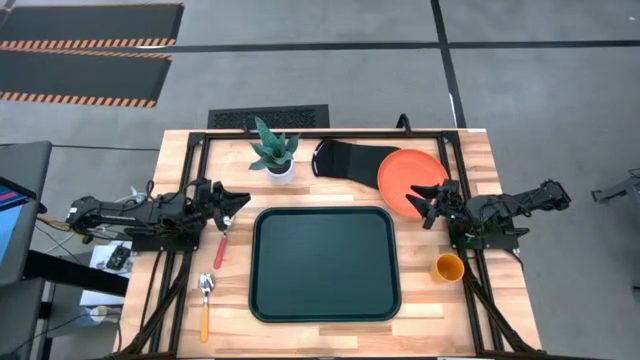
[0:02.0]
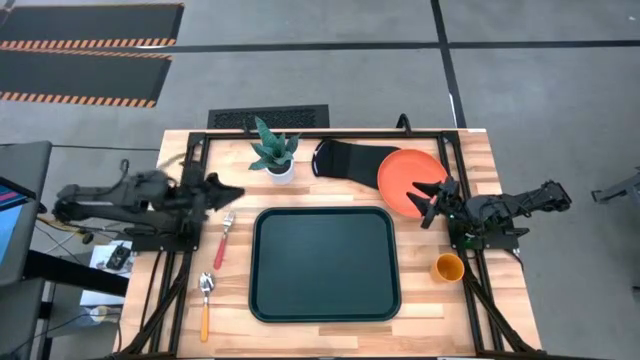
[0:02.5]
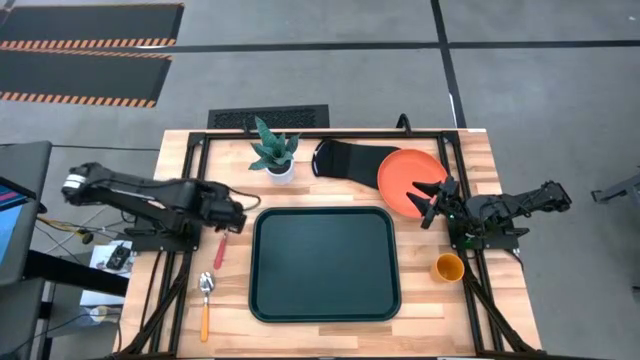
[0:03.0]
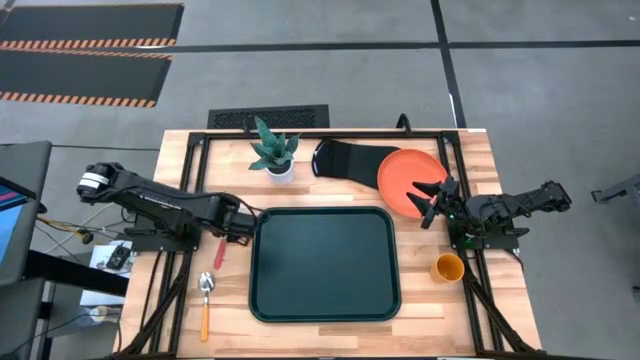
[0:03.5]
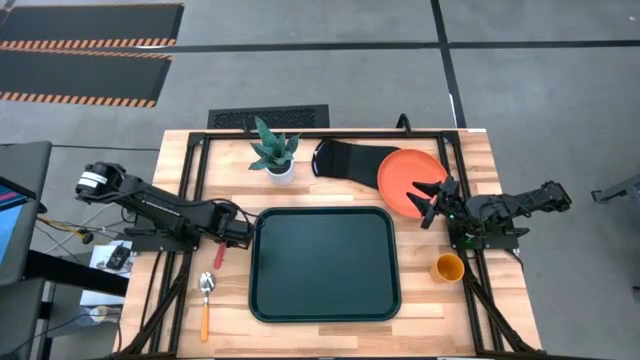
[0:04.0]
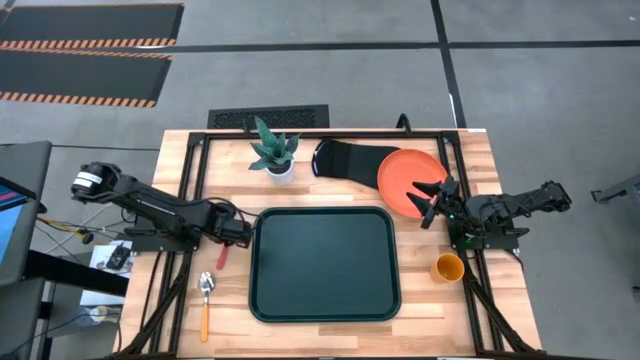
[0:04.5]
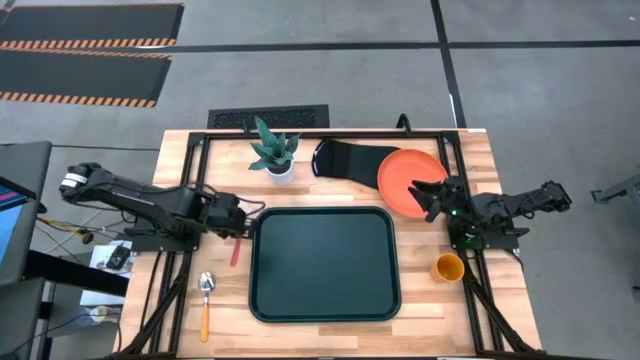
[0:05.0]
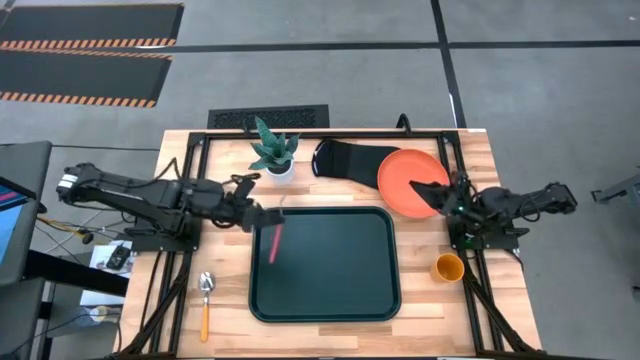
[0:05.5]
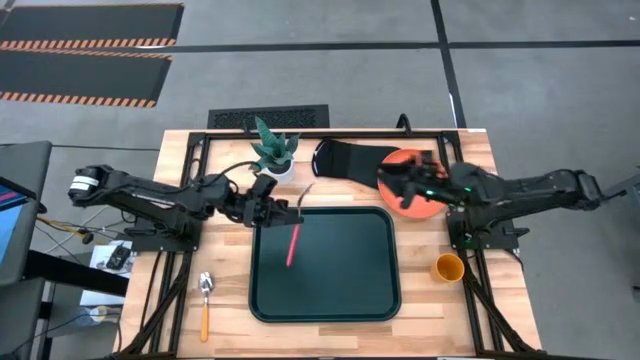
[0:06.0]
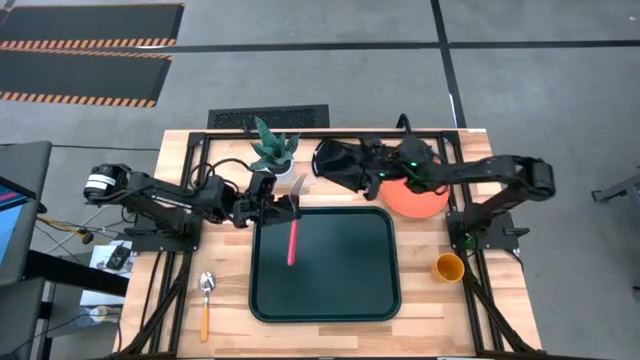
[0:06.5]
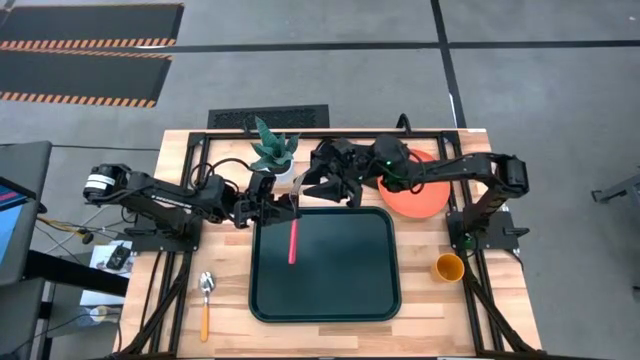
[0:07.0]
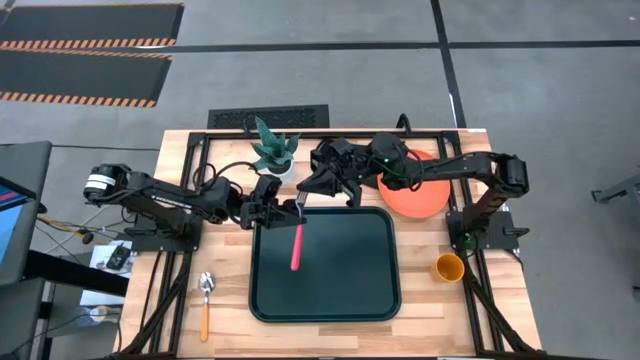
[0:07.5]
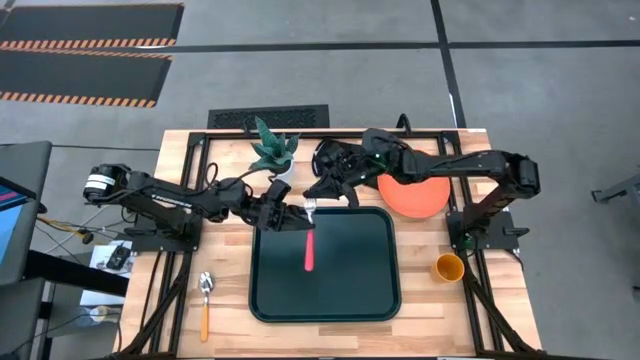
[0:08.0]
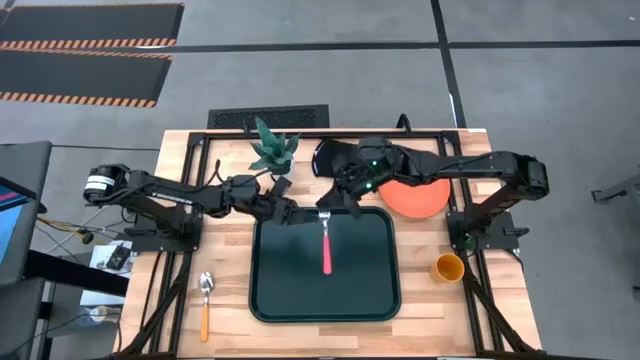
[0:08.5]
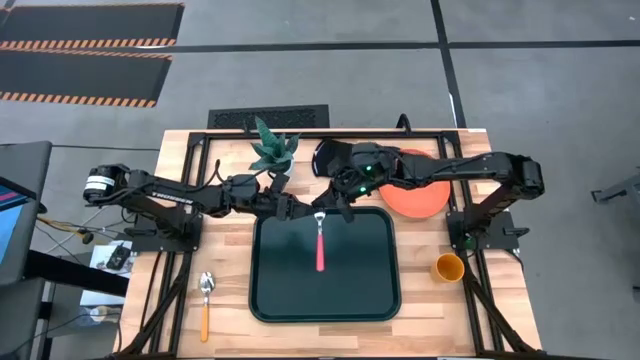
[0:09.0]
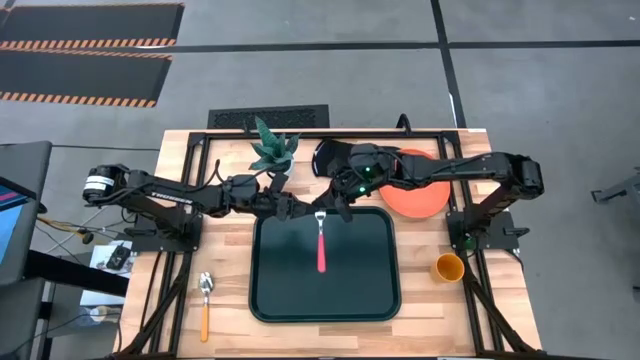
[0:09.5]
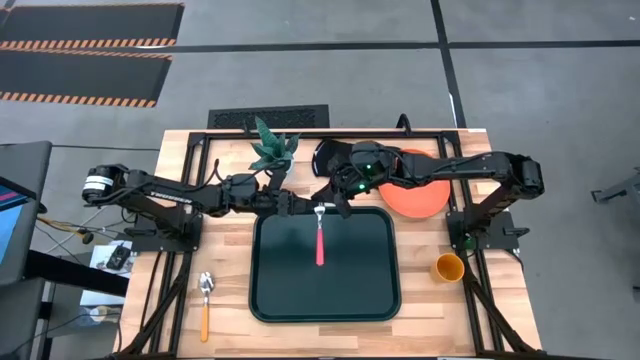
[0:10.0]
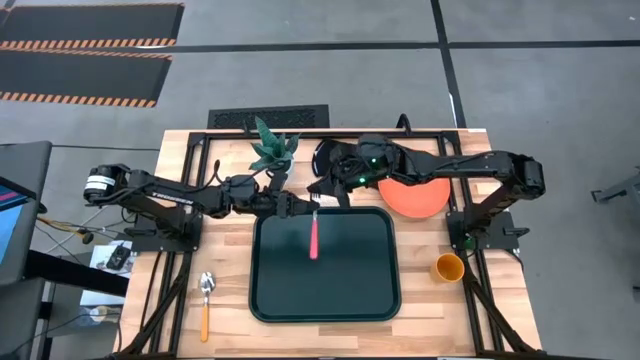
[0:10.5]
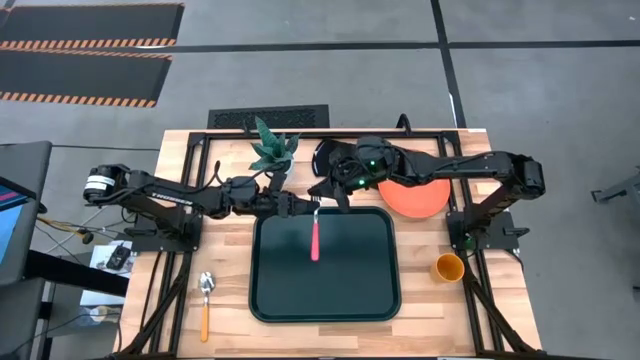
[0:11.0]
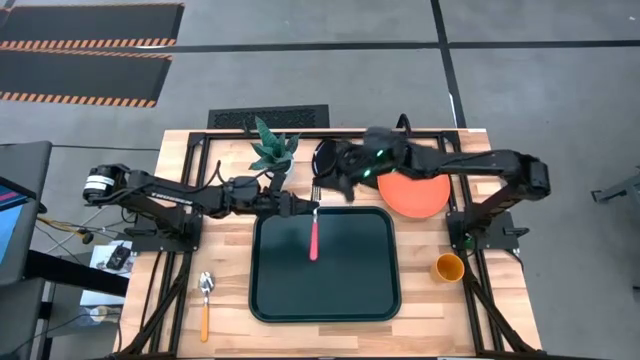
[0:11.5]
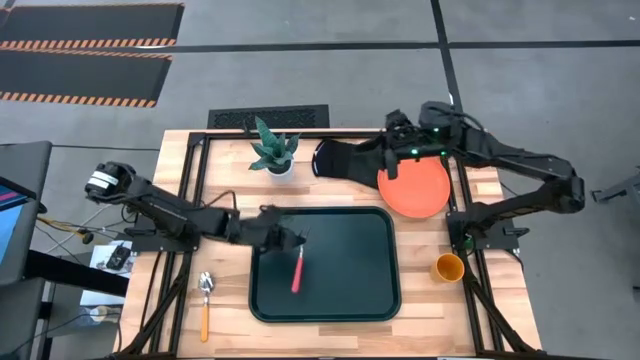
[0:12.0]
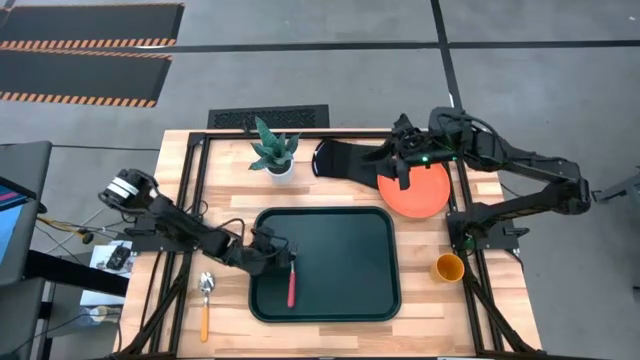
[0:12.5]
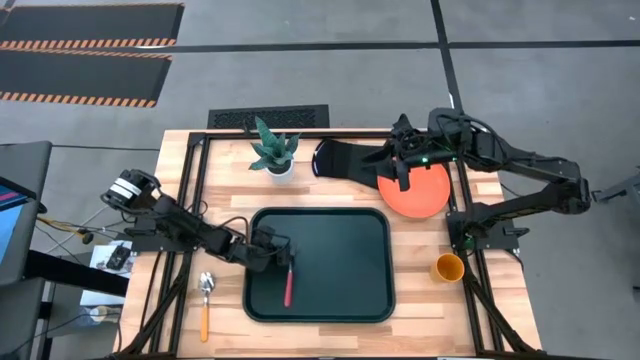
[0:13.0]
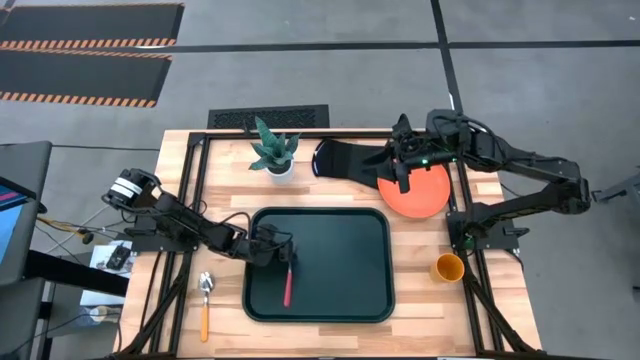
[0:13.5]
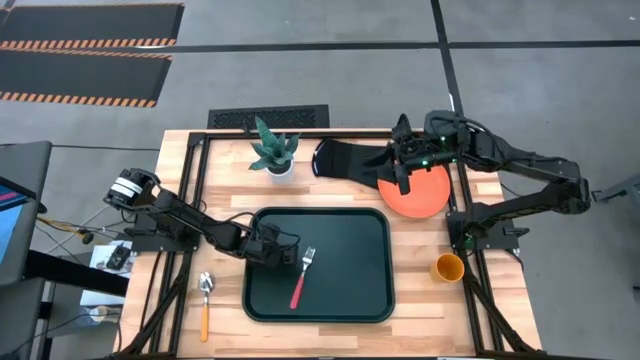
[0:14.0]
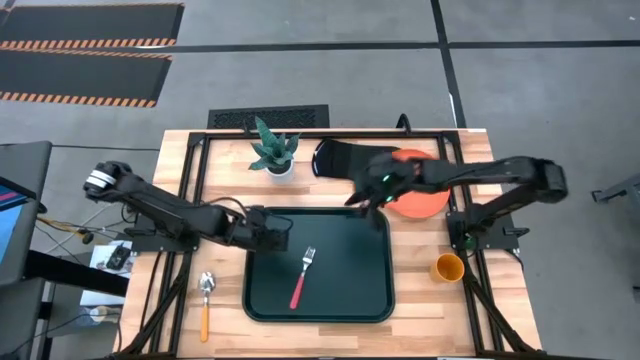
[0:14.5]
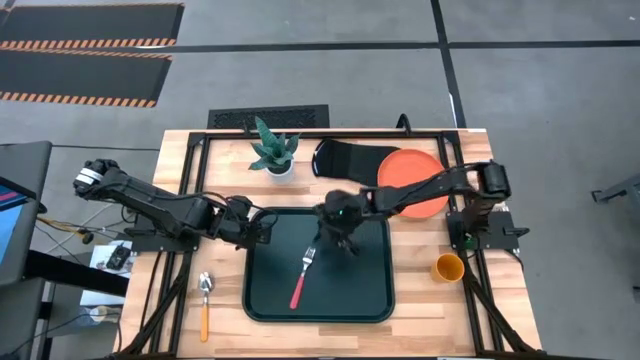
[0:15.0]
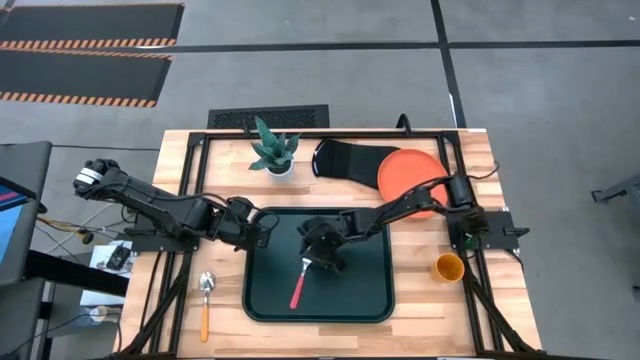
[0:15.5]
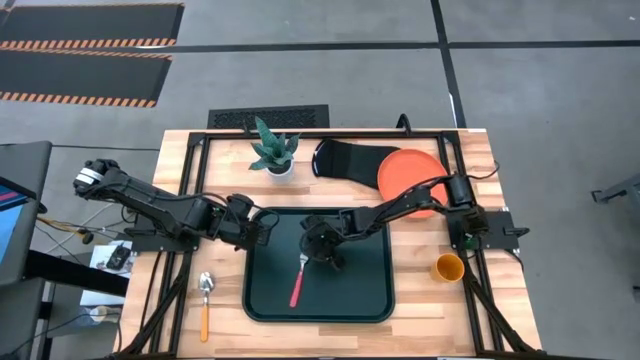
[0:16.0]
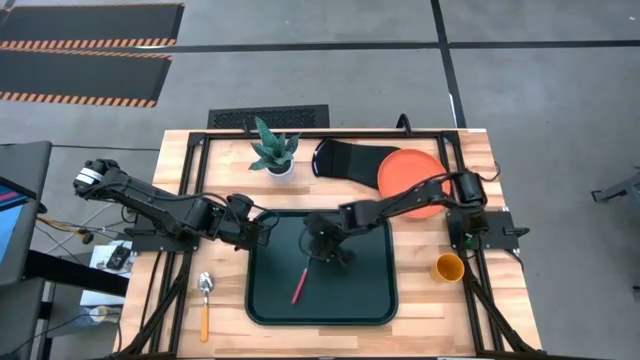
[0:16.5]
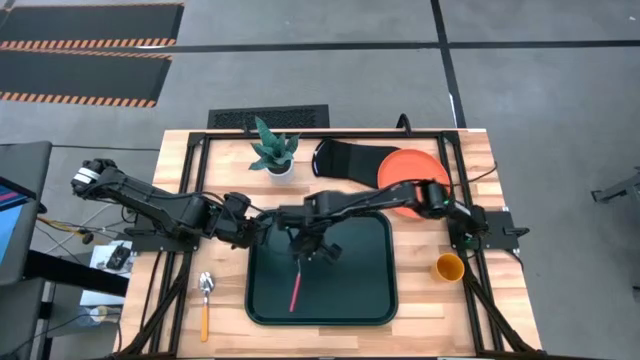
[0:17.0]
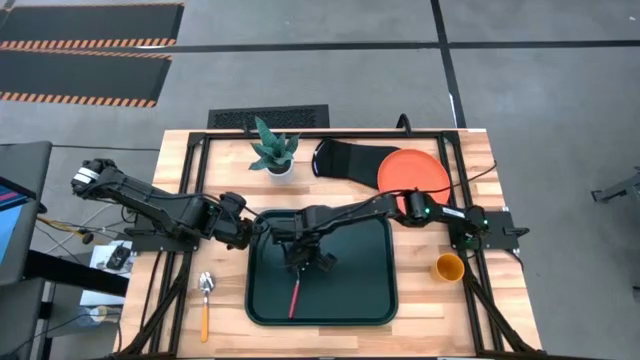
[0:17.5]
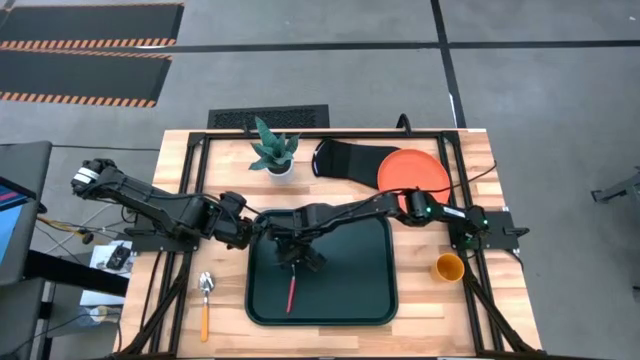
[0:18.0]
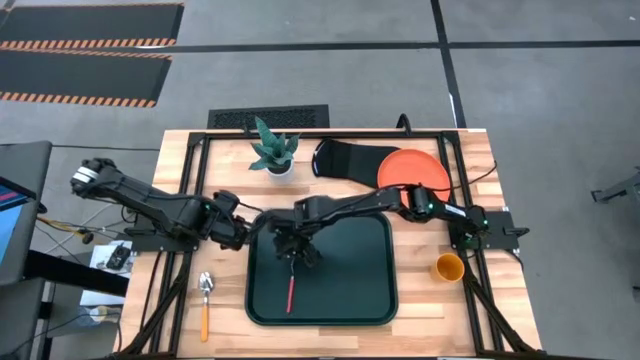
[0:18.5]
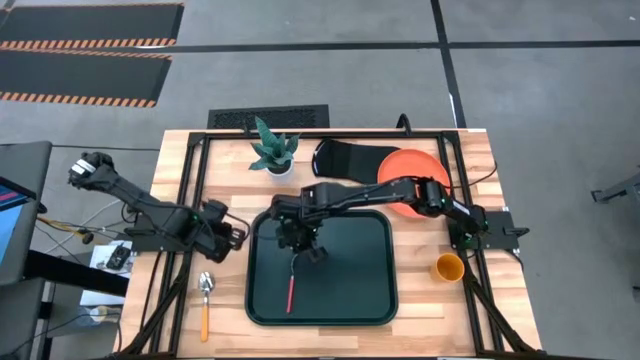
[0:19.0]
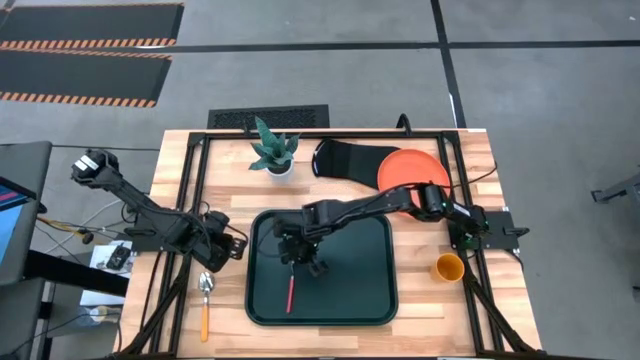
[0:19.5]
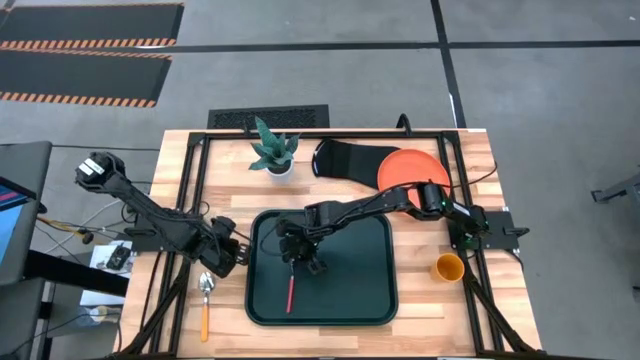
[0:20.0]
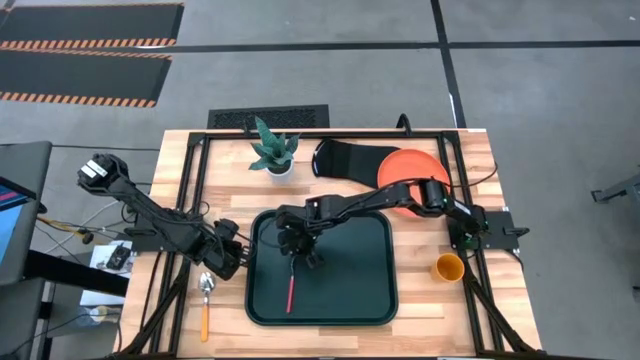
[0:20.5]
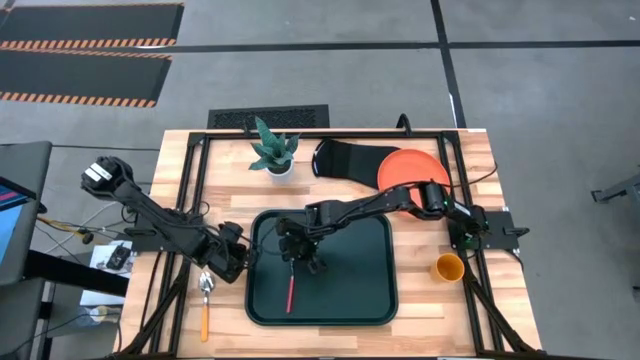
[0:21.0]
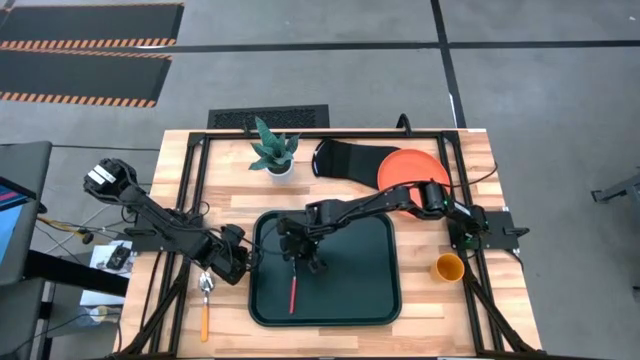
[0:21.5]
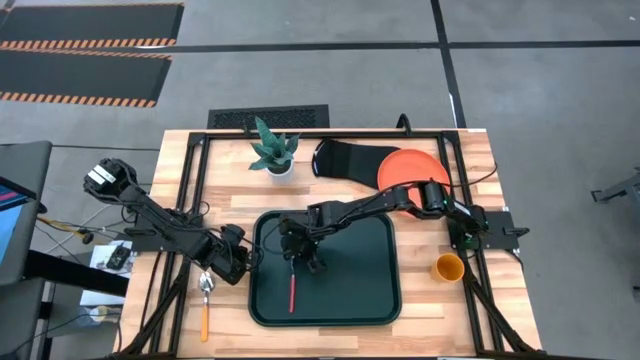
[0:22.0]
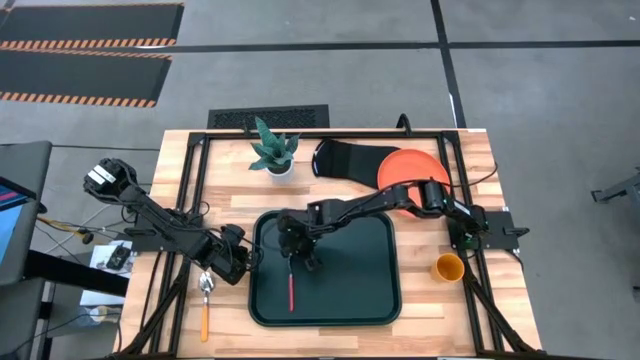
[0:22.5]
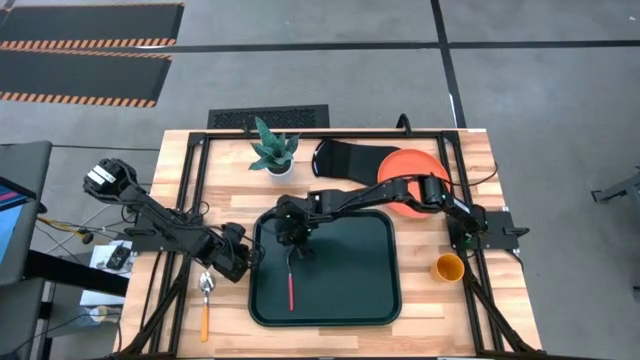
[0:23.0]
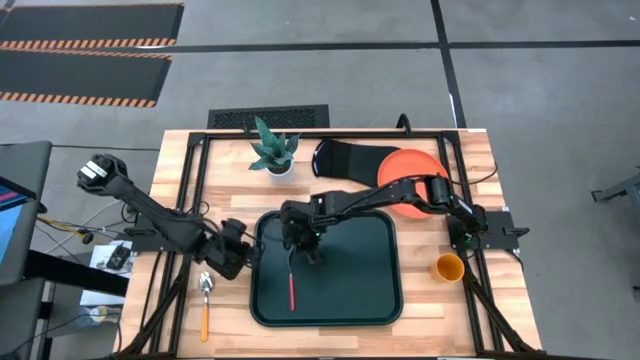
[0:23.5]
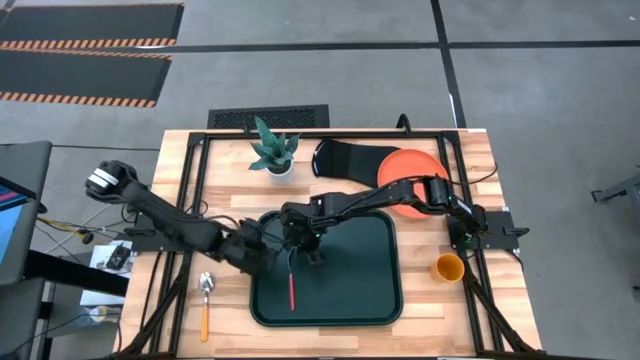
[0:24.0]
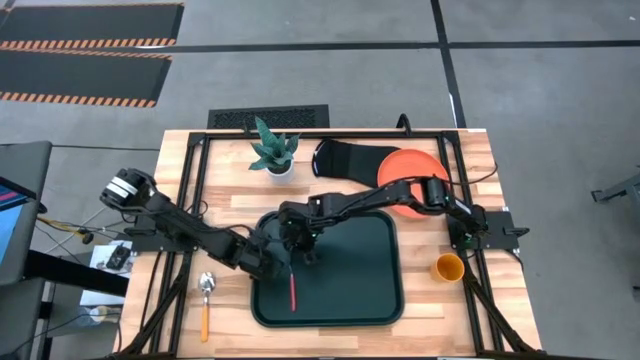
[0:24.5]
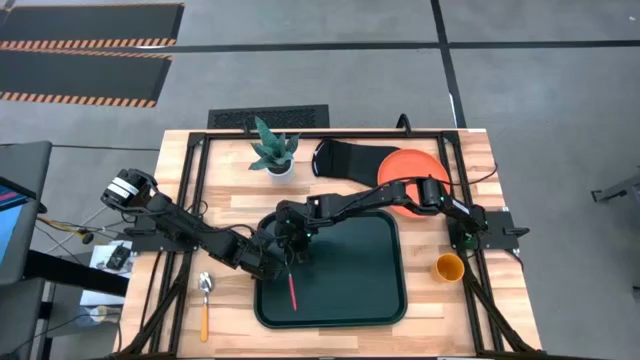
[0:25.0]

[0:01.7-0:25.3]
Task: Pick and place plate/cup/fork/spoon on tray
Put the pink fork on the left side of the black tray
